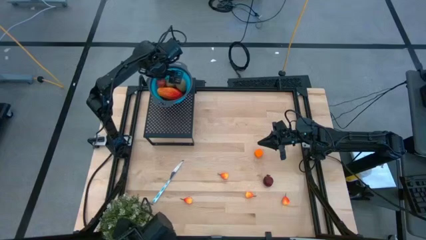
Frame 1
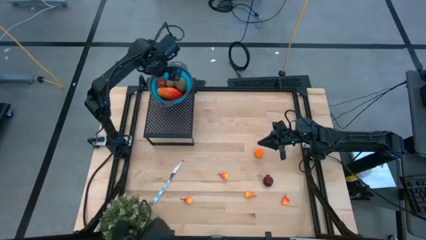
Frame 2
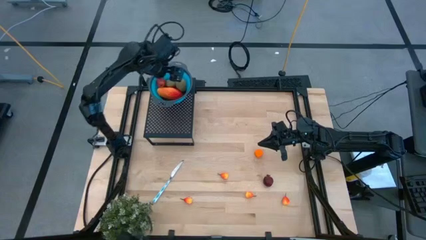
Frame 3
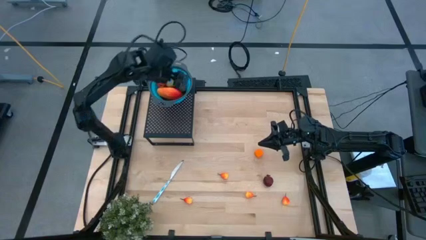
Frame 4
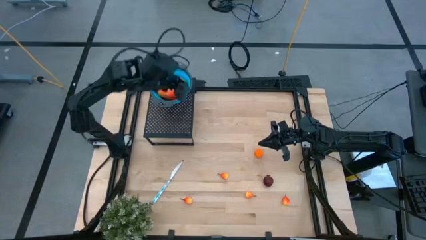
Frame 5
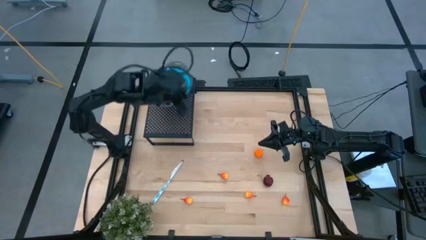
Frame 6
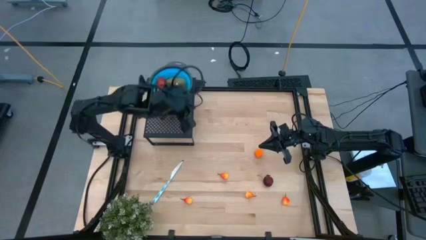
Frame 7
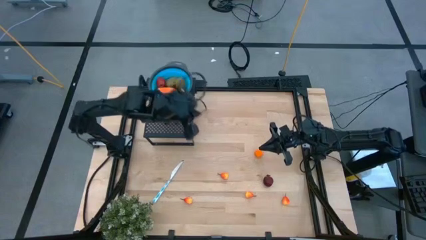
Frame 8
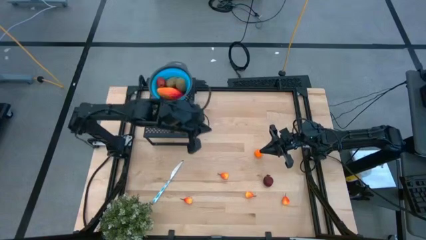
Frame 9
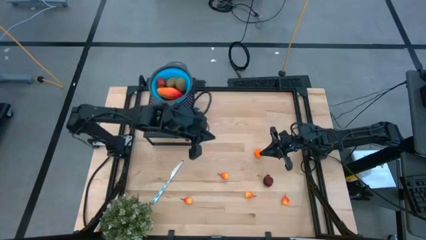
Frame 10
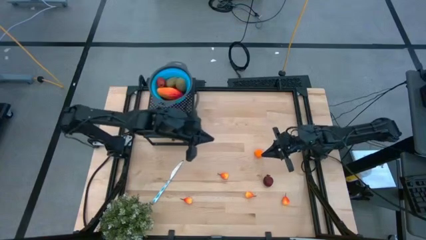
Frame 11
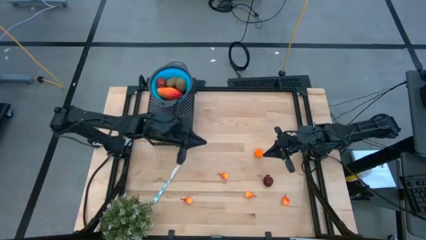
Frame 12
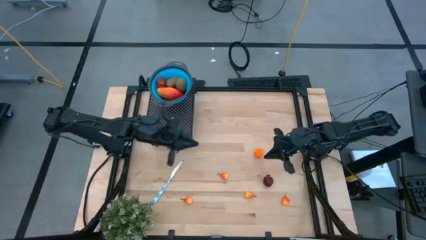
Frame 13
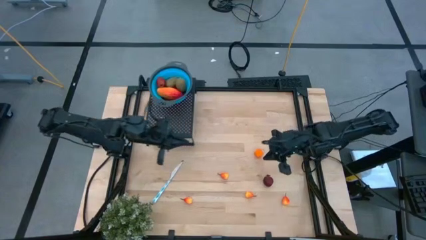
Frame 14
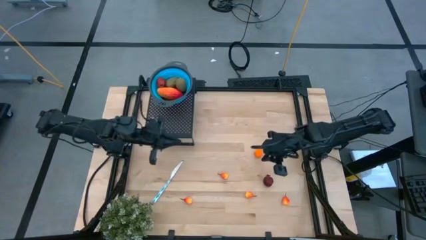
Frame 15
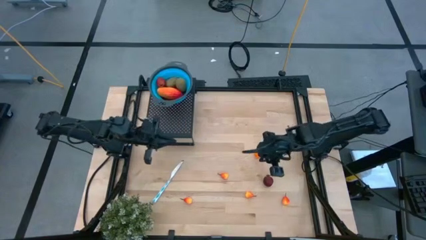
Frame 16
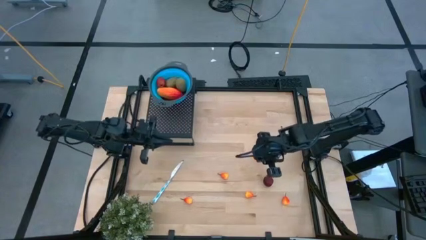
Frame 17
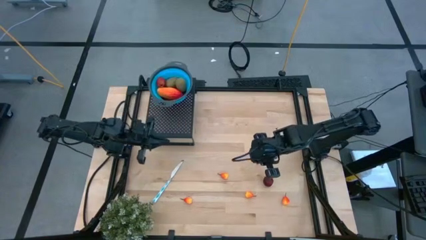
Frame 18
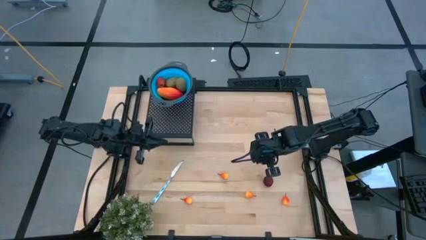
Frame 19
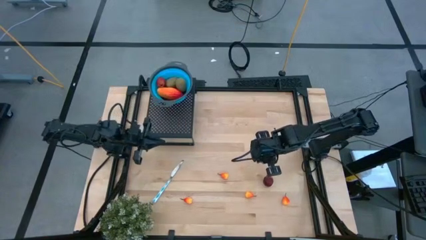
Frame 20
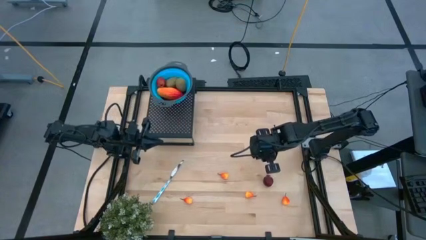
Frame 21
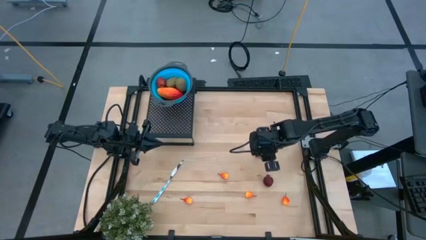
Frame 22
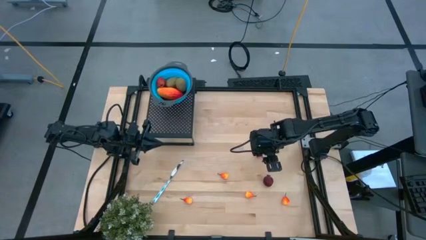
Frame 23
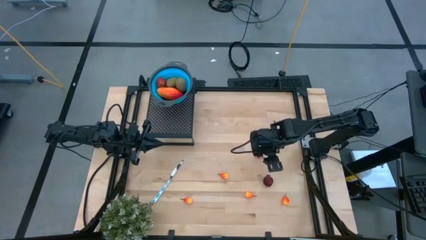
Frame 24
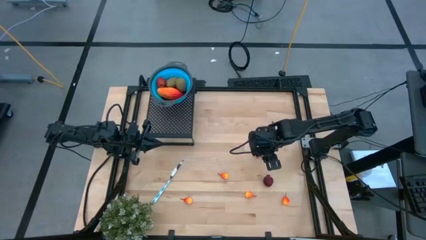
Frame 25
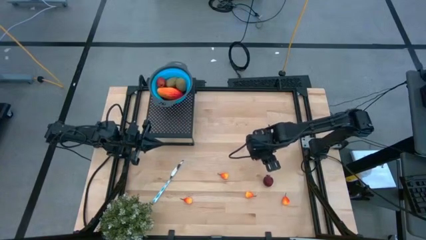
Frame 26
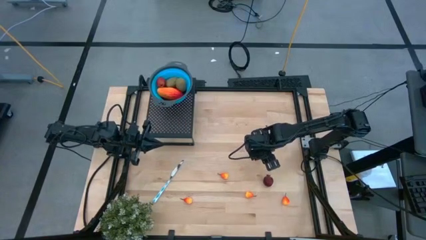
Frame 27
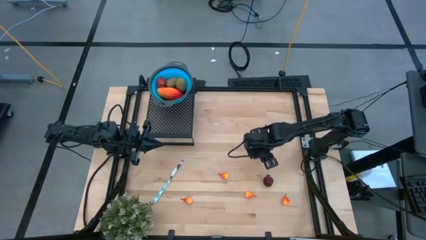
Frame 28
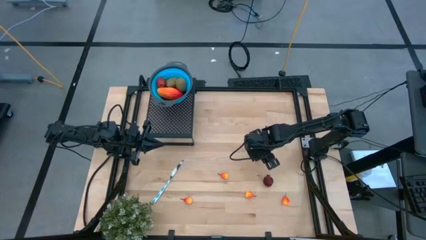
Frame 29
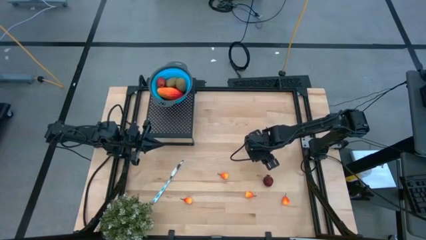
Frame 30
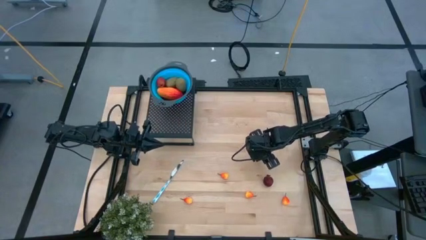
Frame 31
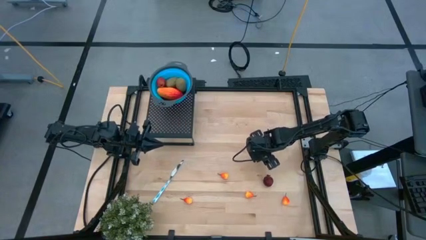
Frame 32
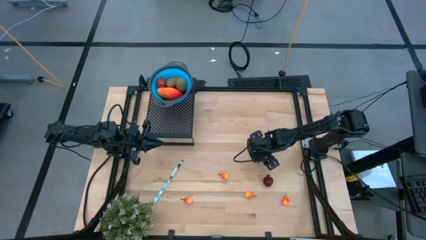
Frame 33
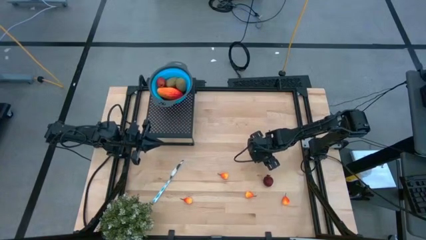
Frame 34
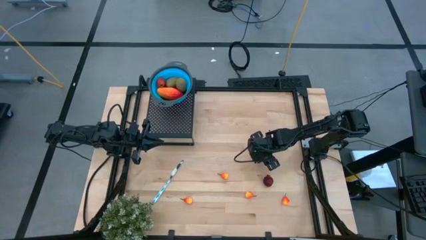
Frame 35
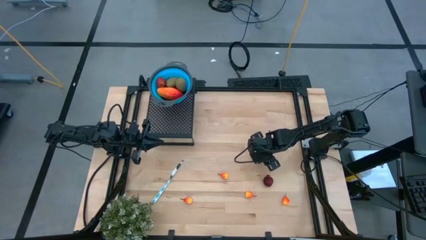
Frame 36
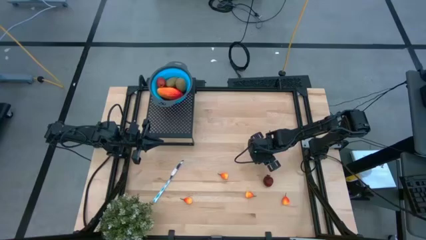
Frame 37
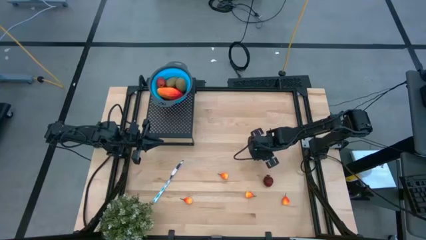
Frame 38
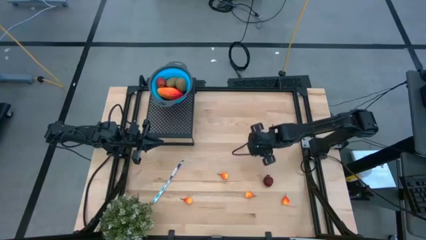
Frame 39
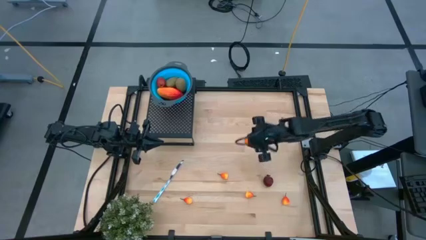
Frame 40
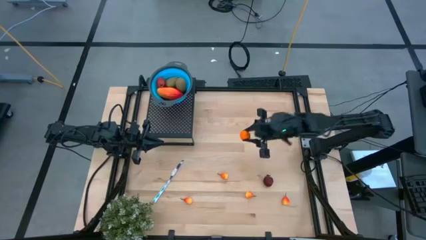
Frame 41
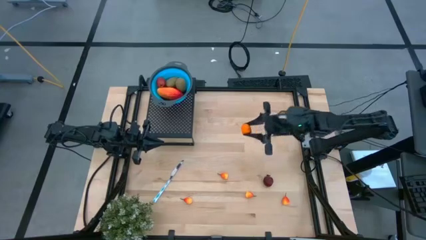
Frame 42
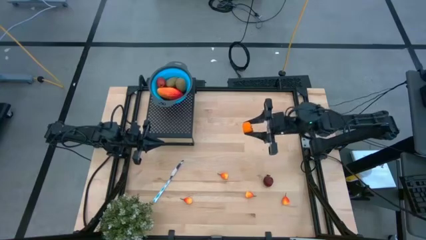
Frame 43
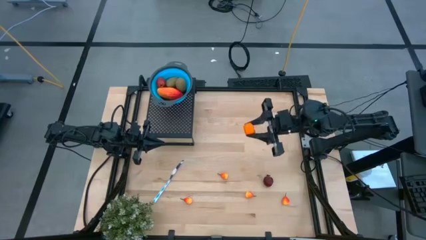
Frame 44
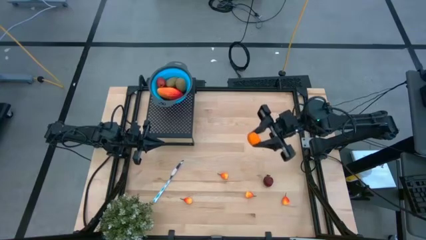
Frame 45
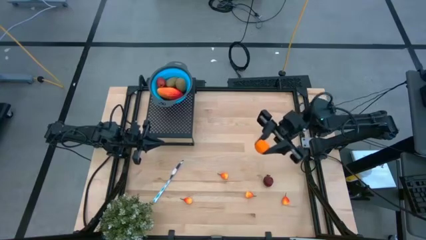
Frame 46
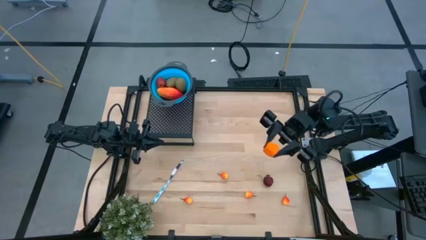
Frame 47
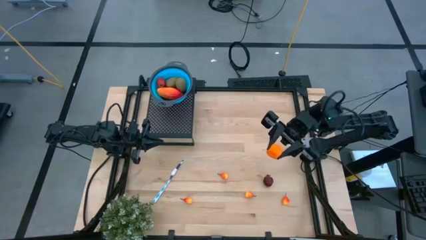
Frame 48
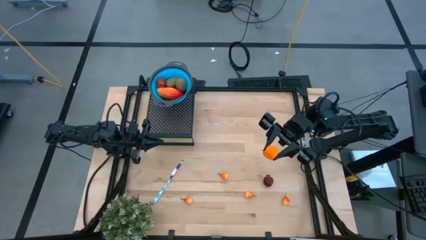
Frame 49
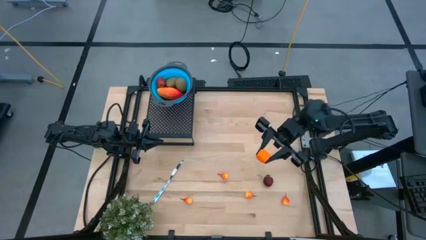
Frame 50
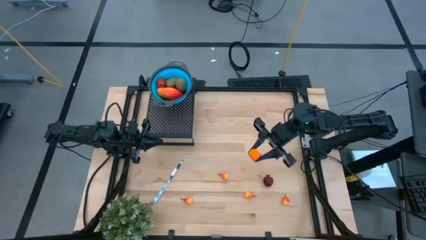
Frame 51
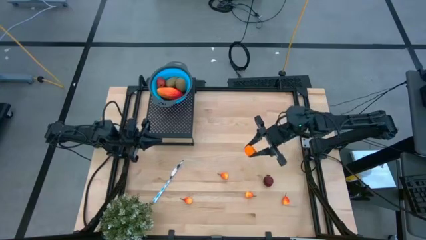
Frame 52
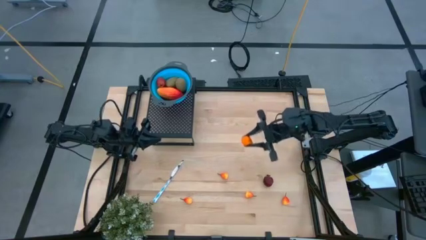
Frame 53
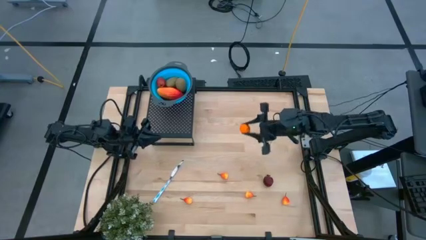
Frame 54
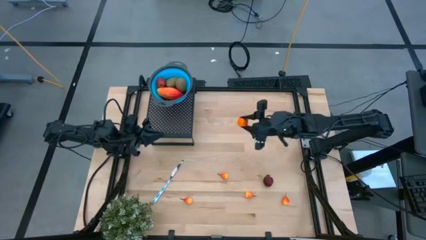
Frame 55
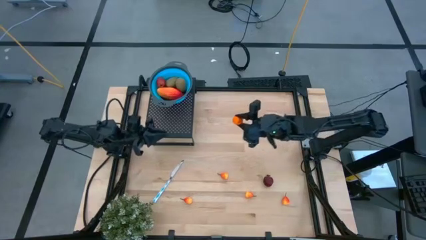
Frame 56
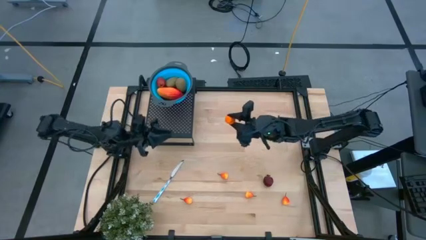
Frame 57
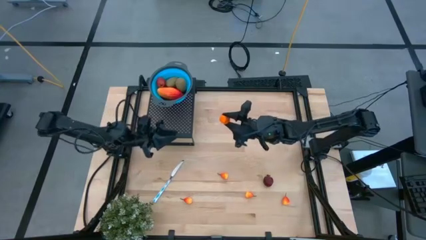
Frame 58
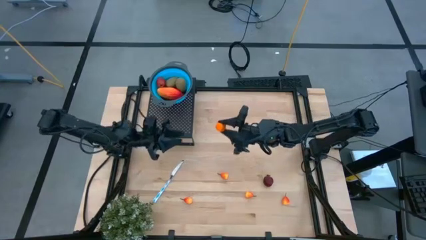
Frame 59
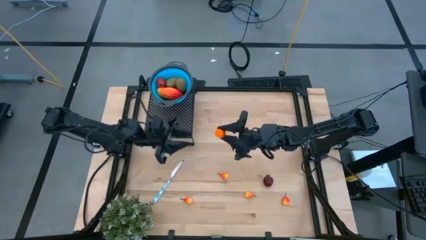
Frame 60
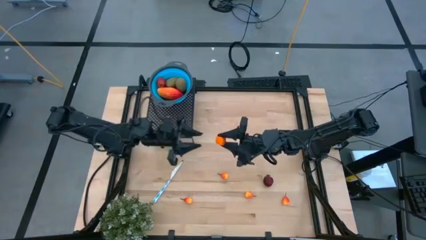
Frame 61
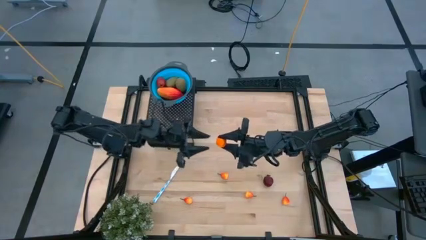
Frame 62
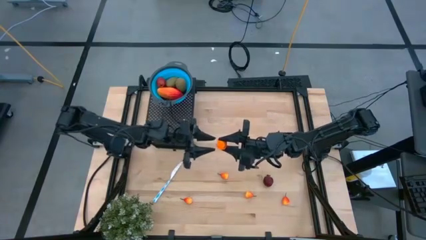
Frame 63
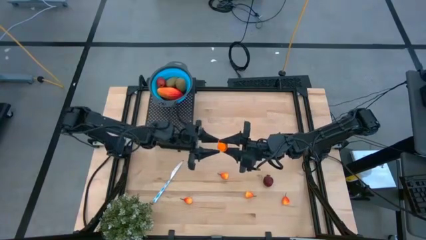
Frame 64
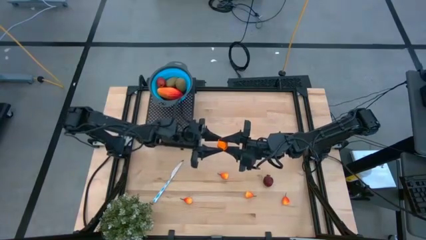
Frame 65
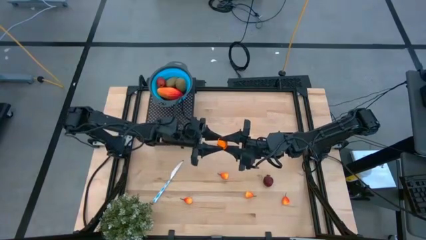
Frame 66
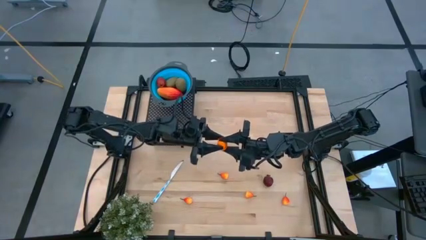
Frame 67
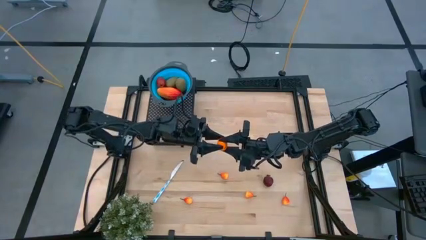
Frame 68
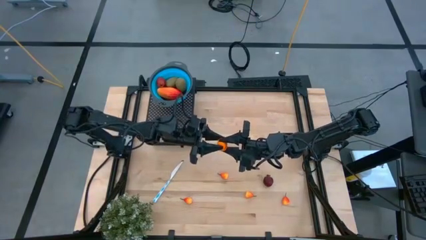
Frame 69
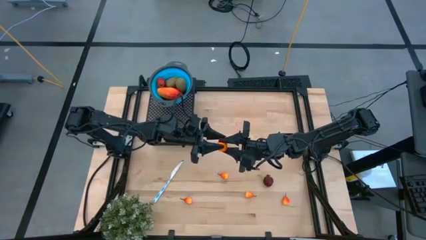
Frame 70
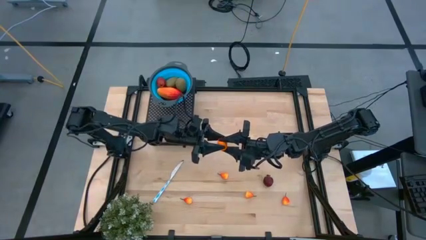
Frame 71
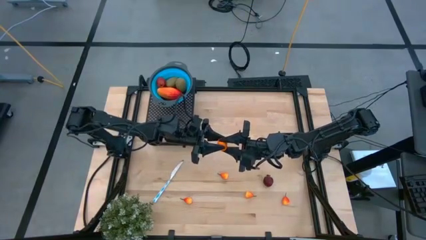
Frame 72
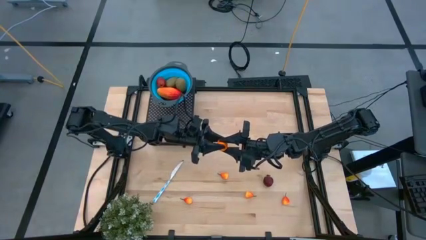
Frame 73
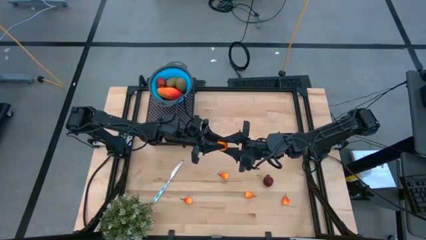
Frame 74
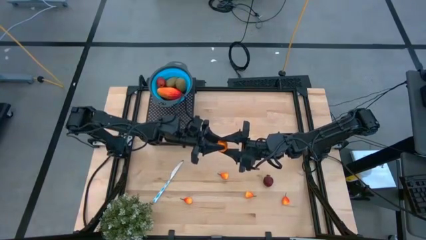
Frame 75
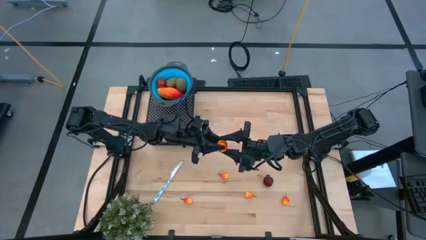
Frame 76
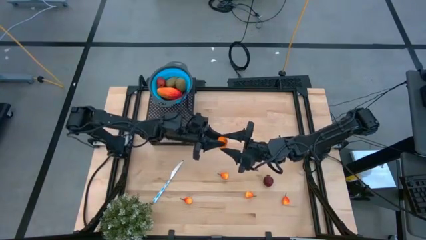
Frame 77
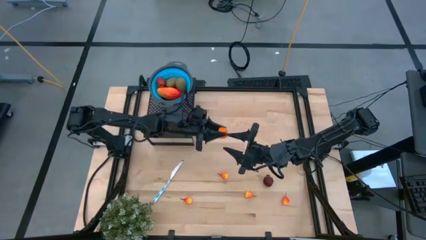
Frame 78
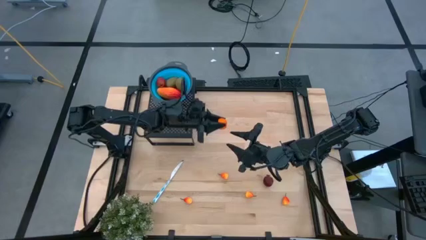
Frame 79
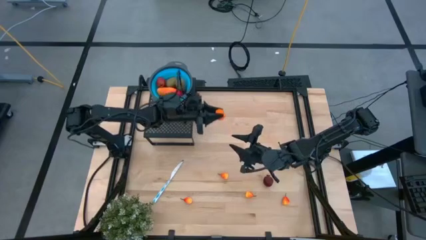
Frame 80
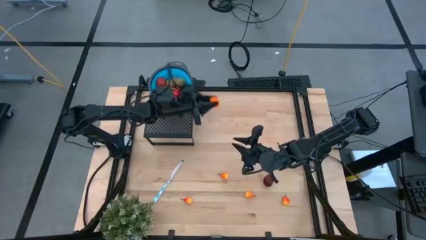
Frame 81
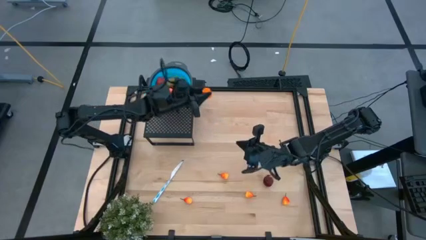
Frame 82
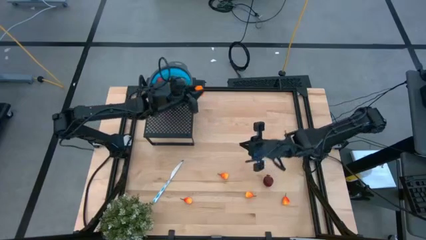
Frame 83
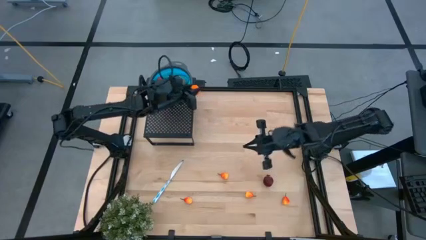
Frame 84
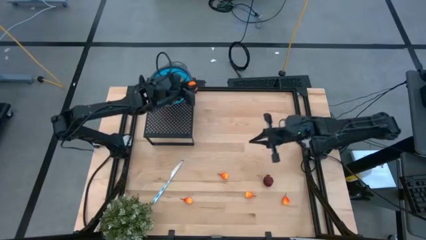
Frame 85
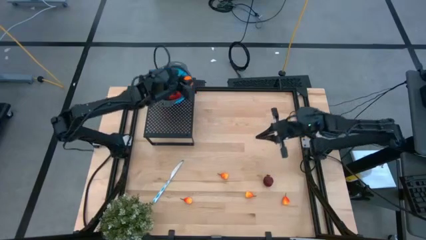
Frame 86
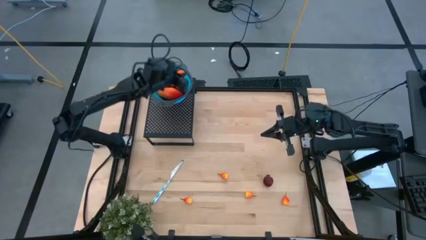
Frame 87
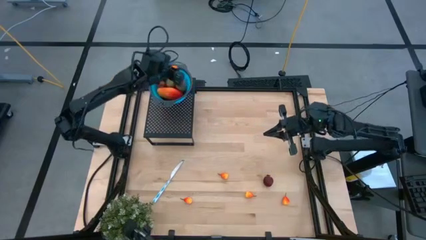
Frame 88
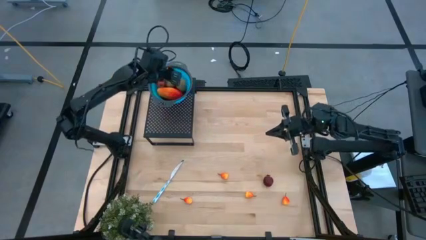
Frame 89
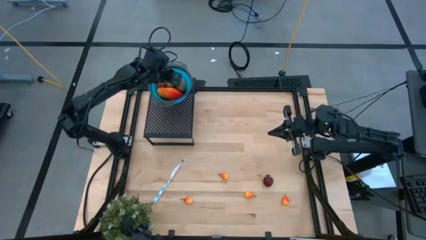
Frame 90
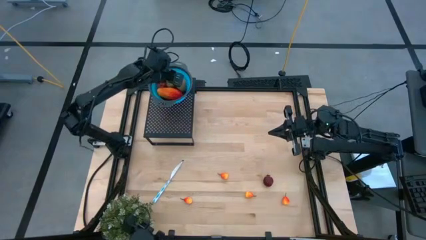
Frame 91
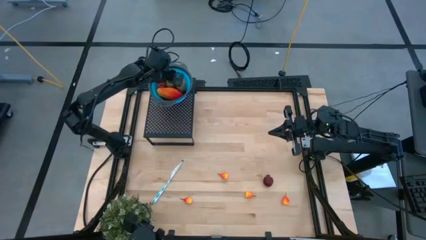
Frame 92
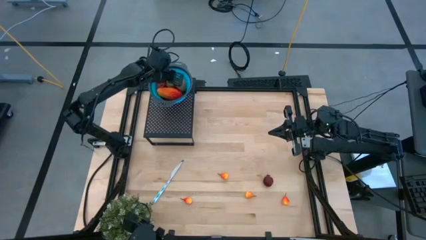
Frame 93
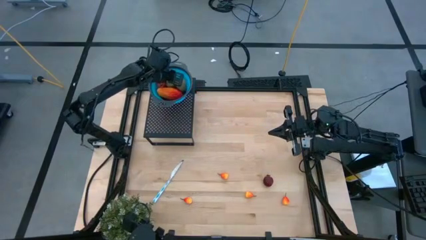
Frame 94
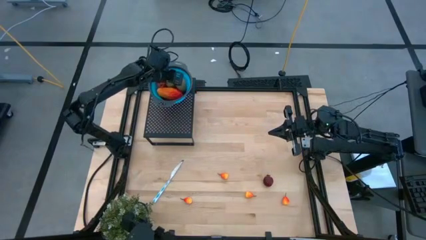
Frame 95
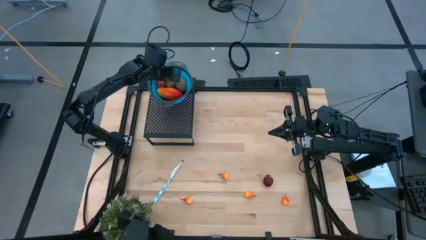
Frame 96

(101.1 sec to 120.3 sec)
Task: Pick & Place Fruit
Put the orange into the blue strainer bowl on the shelf
